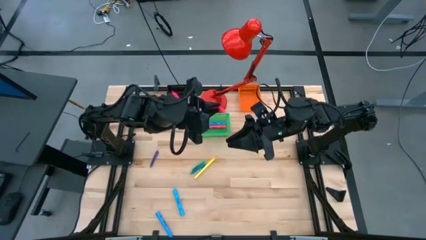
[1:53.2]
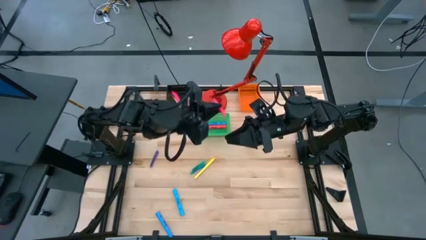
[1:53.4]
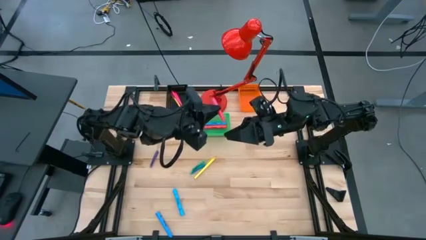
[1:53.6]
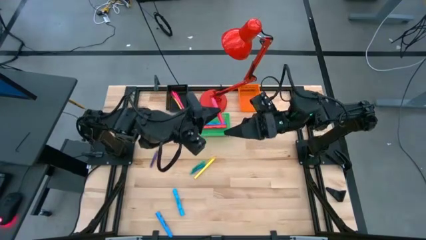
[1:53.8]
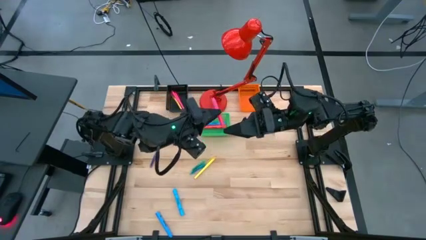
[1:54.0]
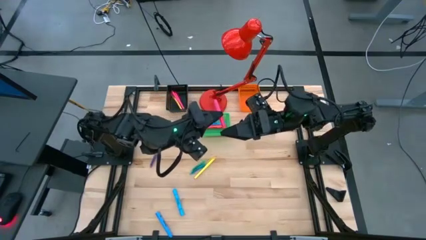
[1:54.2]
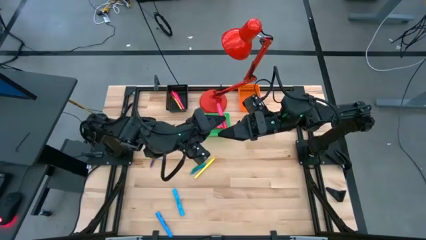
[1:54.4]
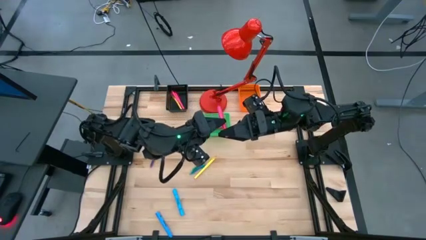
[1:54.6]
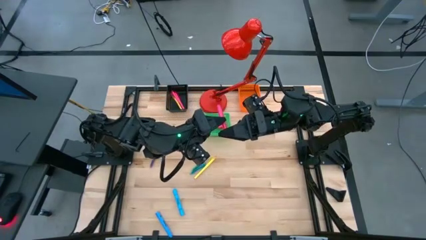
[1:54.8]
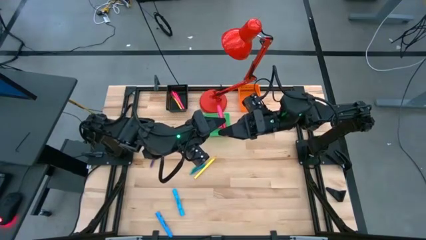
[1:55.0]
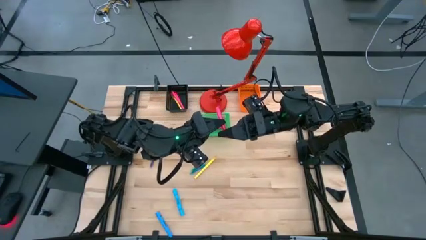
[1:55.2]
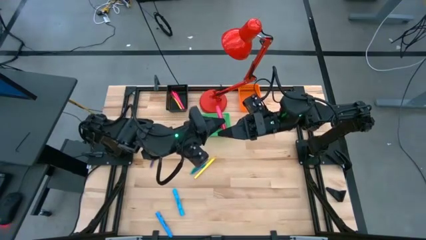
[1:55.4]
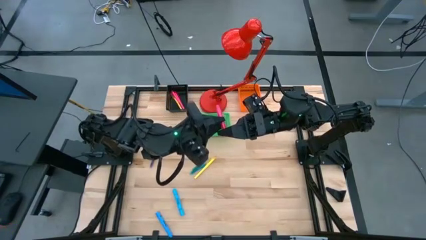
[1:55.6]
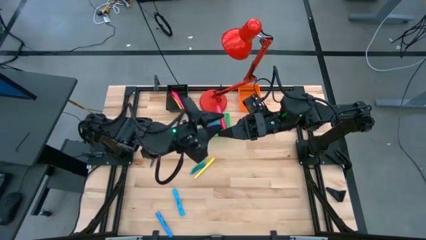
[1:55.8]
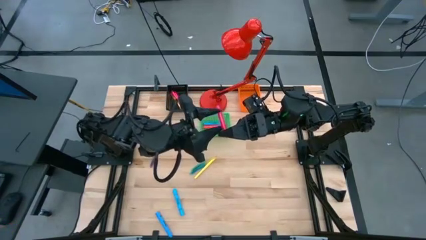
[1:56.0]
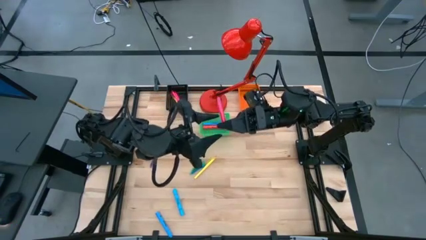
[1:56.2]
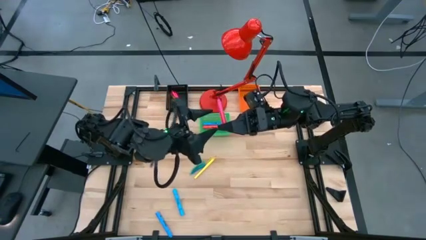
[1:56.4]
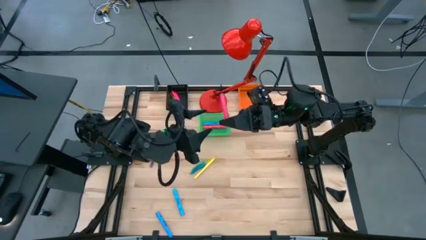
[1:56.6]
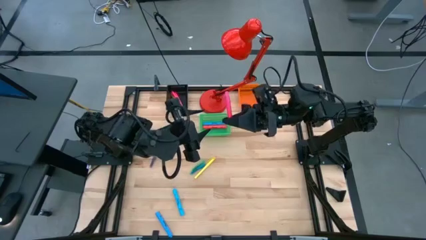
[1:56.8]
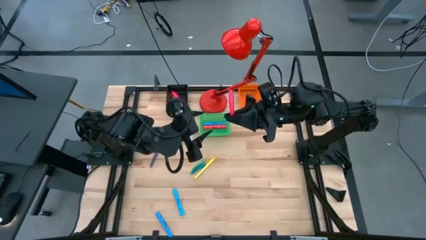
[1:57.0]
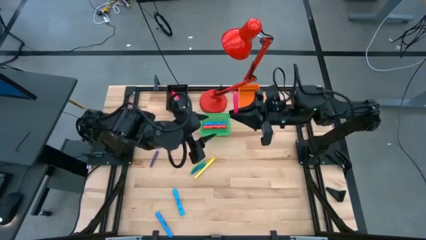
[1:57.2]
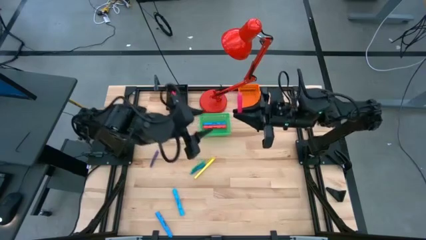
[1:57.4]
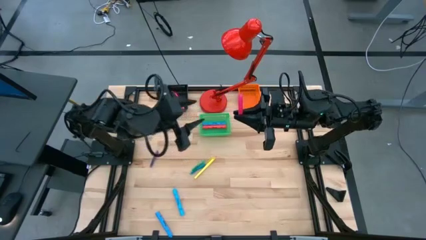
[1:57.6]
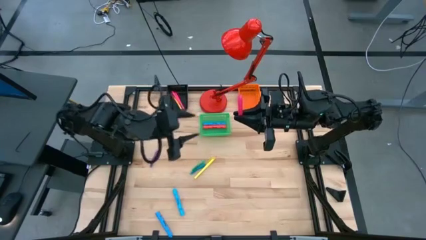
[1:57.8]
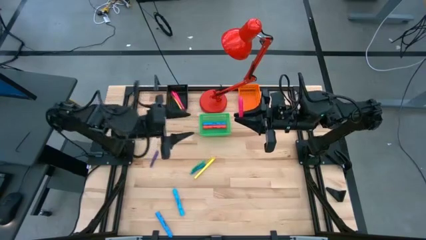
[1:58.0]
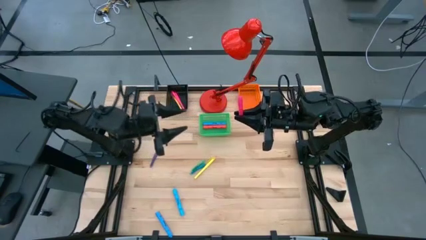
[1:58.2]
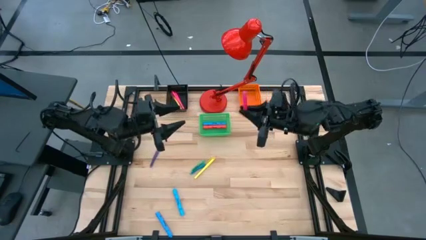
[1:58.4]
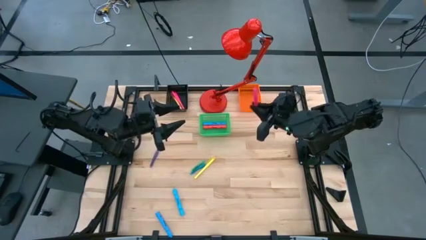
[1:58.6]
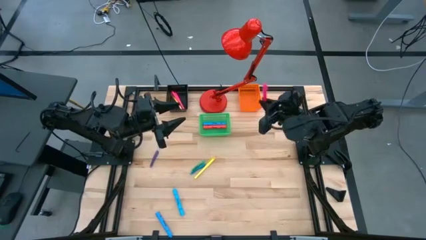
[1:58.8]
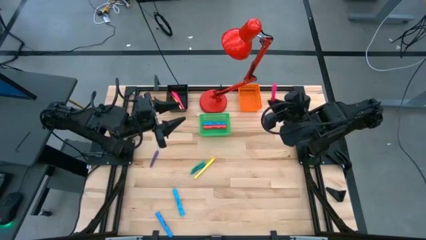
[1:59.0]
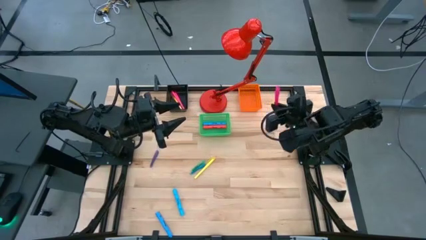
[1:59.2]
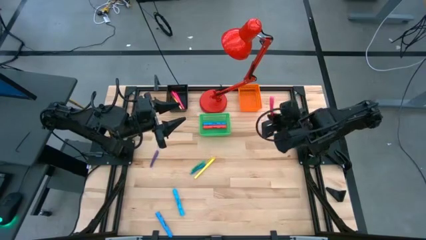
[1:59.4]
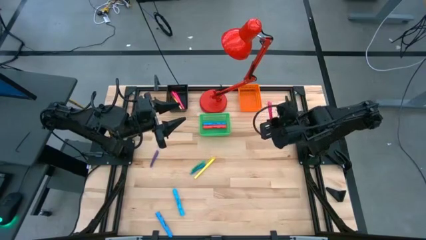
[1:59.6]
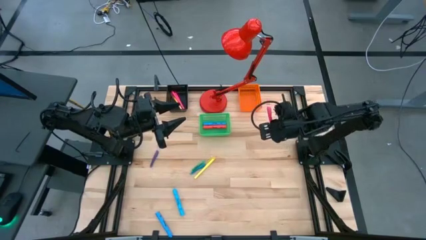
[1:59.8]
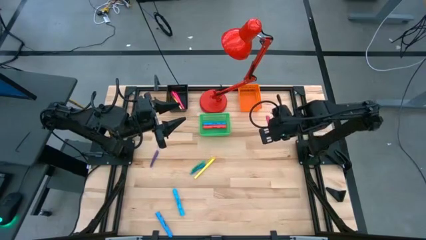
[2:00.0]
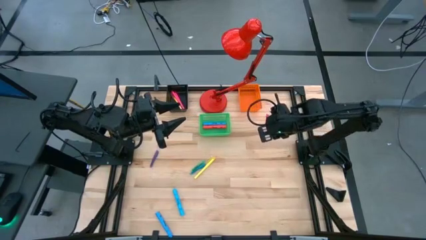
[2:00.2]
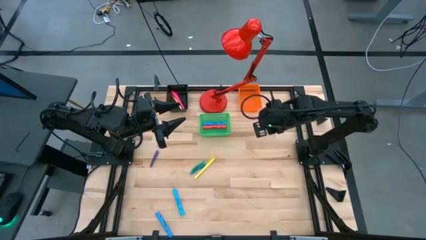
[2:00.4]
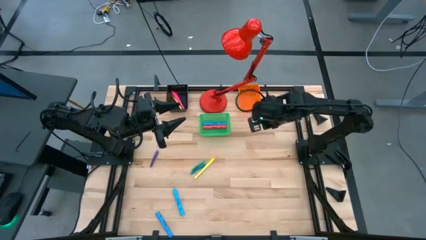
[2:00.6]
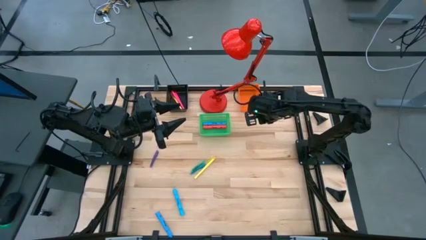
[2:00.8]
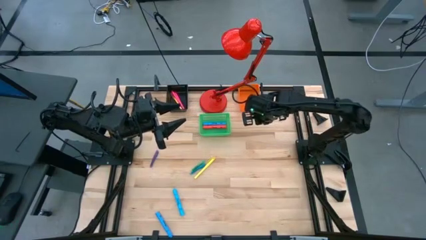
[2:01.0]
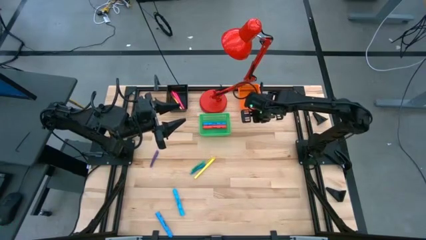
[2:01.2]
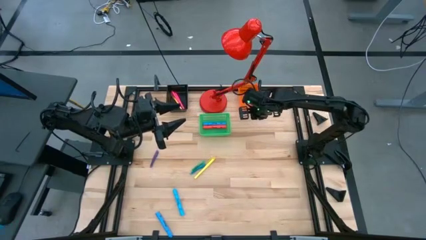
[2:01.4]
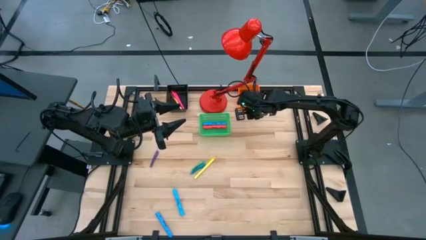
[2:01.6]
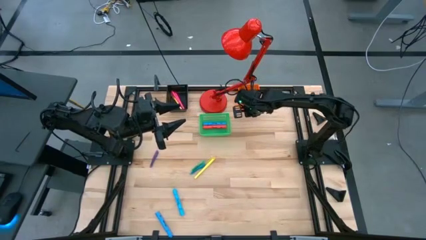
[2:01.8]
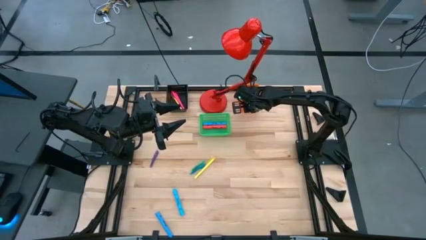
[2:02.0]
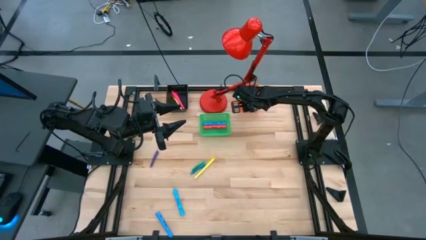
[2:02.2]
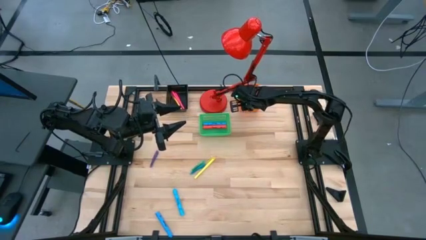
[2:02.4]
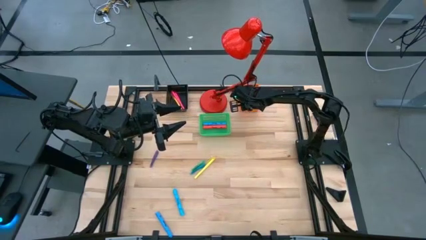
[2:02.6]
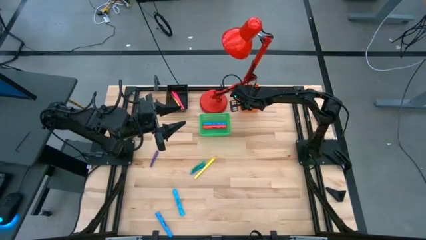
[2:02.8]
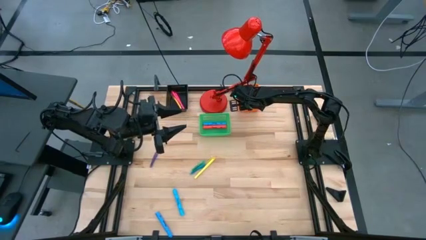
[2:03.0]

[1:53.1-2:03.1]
Task: Pick & Place Markers
Put the small pink highlighter into the orange basket

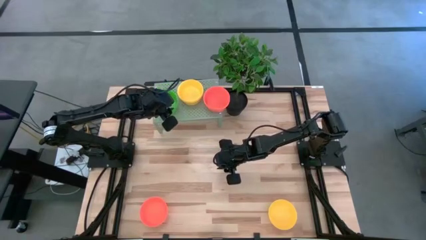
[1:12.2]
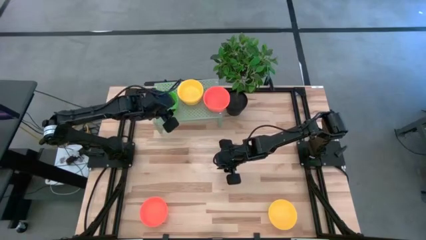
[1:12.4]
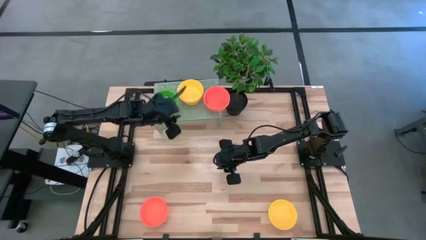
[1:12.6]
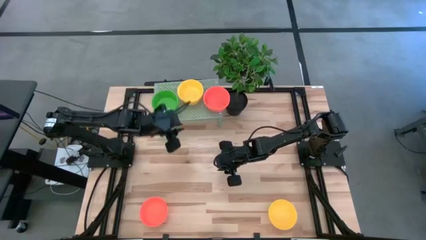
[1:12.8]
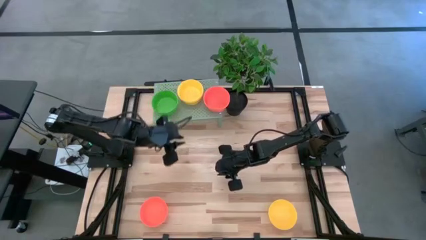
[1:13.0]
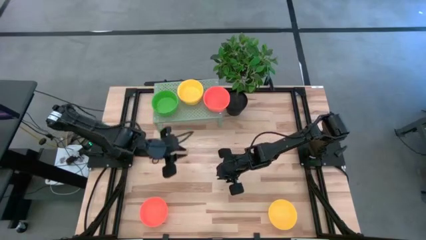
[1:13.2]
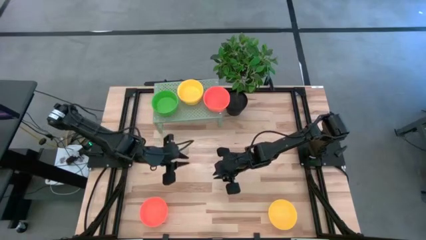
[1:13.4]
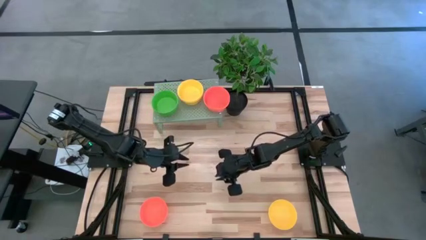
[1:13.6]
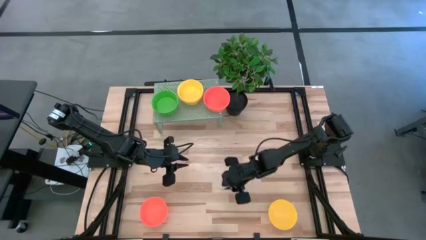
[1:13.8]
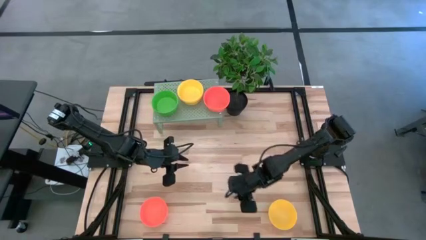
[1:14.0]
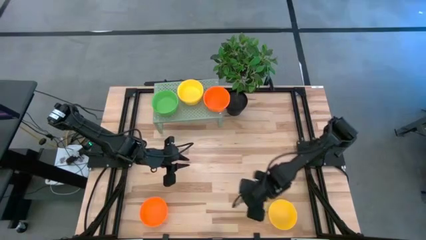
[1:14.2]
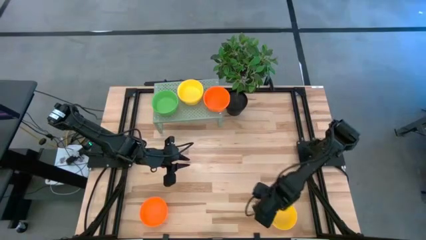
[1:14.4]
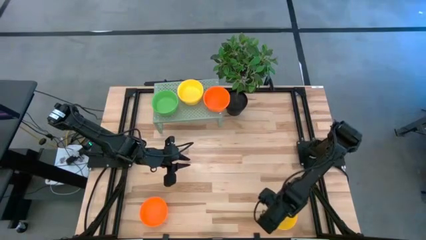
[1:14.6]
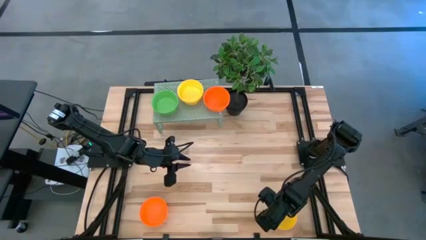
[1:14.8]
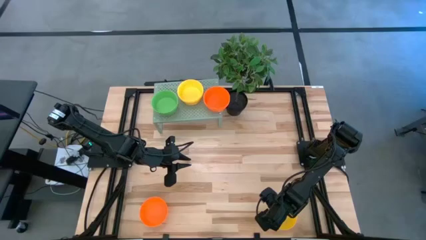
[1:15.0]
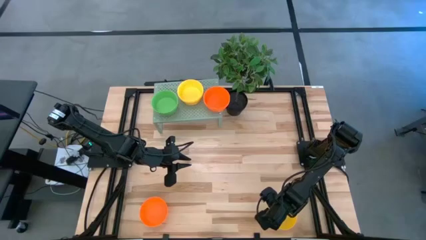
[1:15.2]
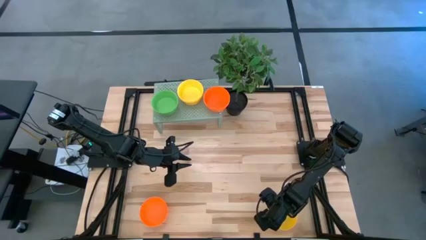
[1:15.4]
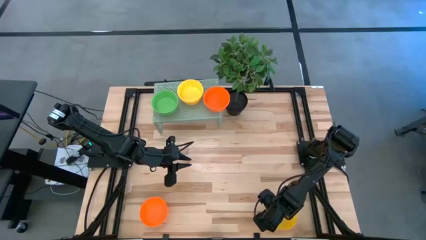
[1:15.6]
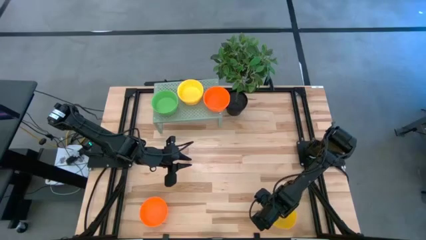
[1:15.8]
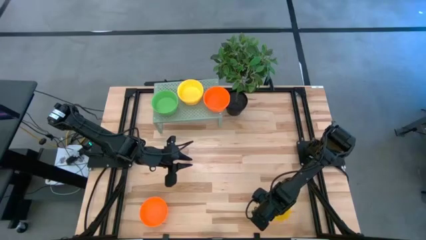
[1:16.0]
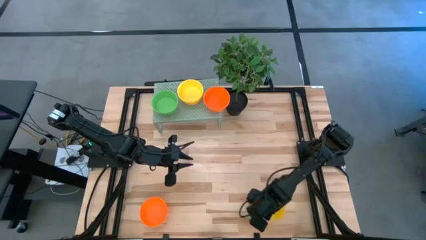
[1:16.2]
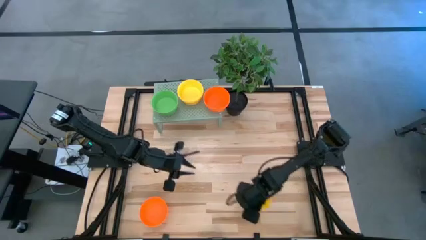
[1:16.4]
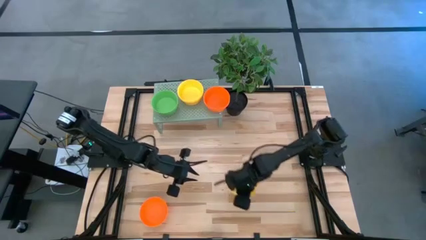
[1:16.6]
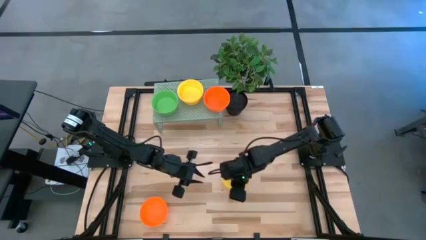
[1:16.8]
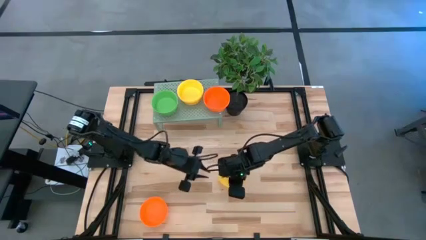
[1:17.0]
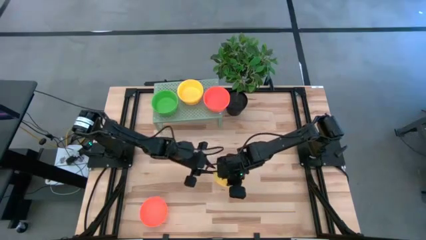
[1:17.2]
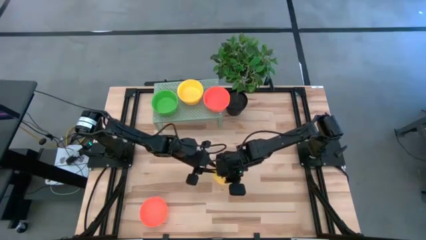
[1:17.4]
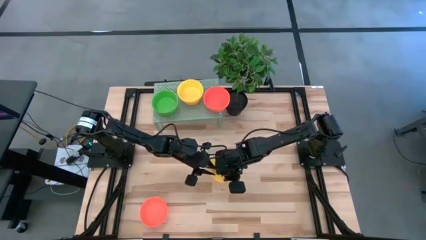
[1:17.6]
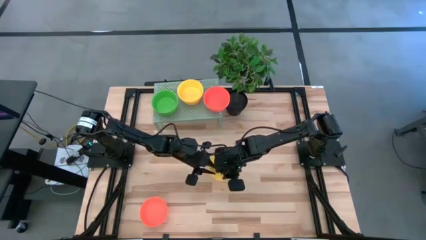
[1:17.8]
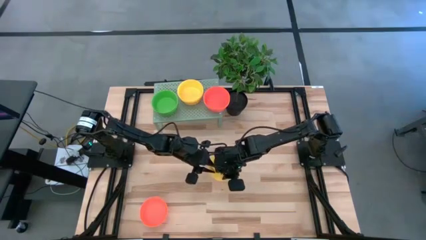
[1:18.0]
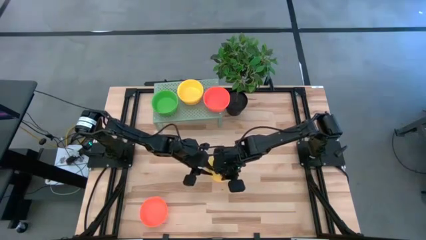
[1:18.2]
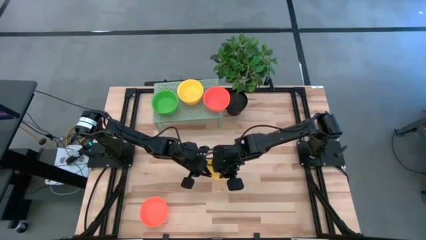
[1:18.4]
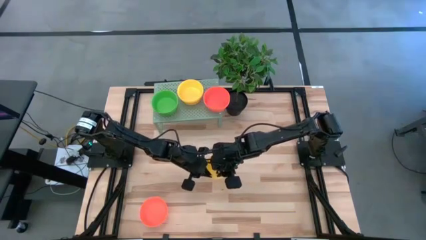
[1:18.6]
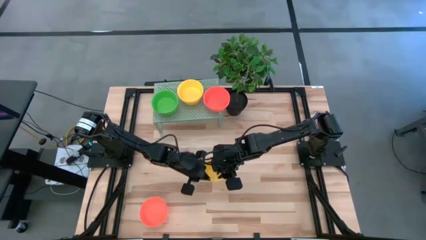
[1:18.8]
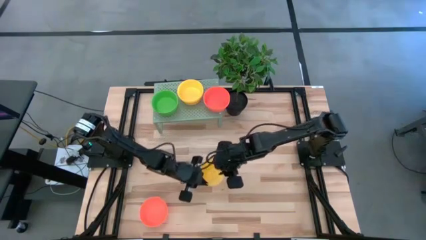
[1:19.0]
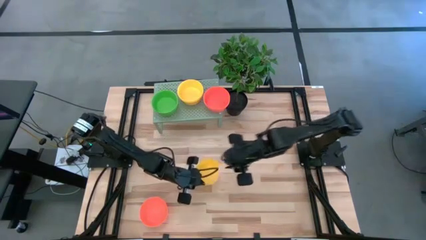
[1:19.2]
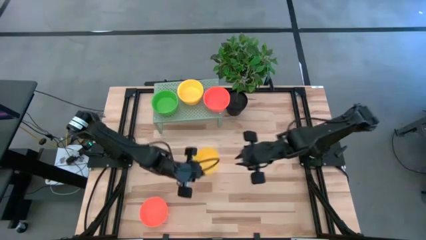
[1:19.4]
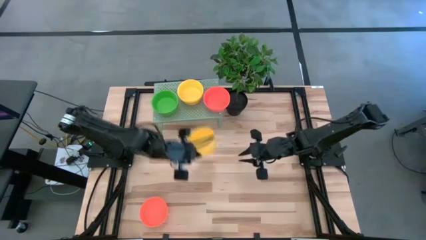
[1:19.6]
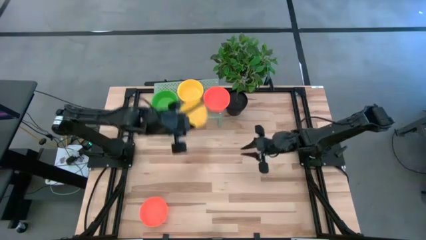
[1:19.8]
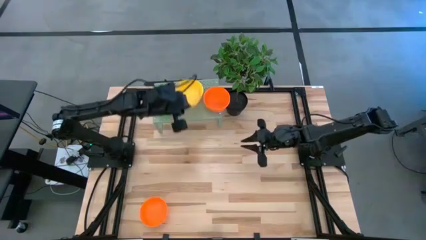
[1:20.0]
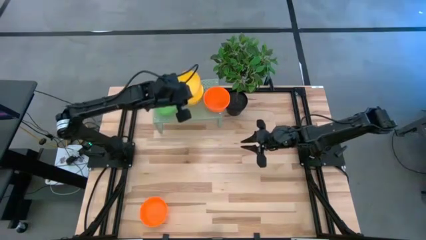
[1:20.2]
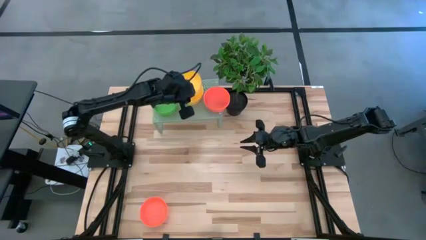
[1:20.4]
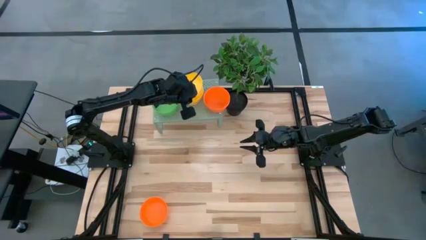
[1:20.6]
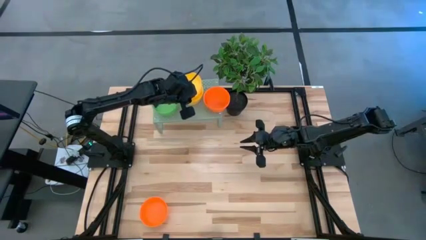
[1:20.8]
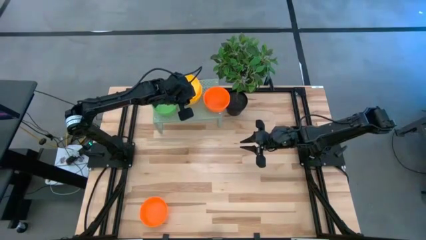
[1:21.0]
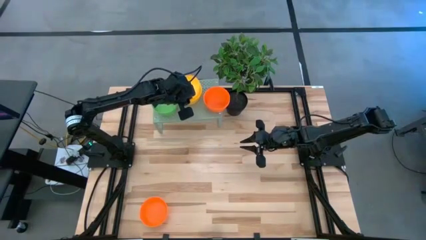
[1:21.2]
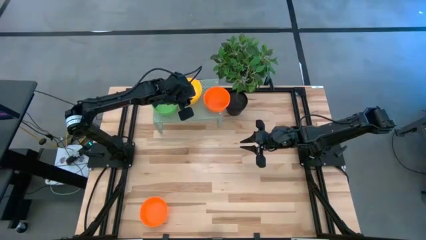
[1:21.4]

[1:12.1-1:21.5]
Task: Pick & Place Mini bowls
Stack the yellow bowl on top of the yellow bowl on the shelf
